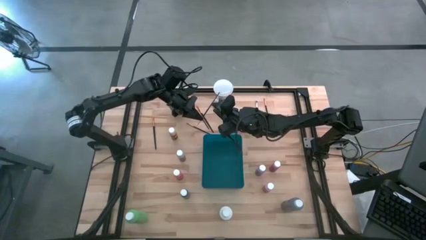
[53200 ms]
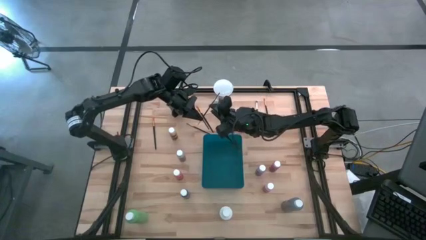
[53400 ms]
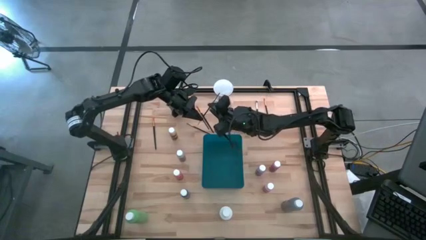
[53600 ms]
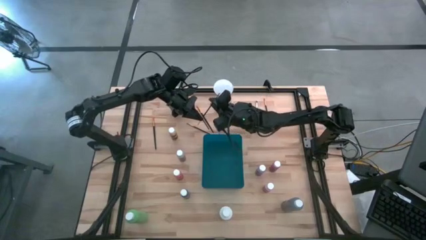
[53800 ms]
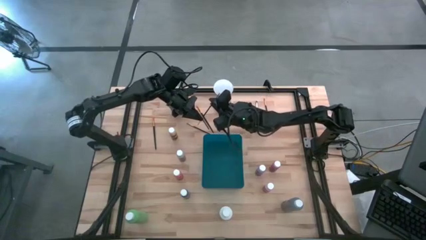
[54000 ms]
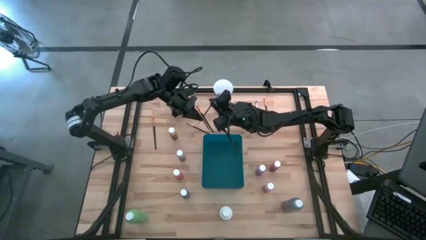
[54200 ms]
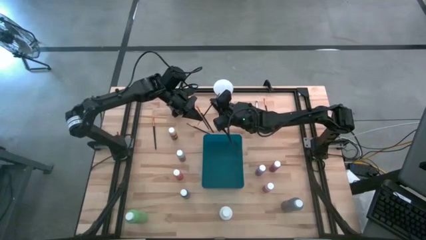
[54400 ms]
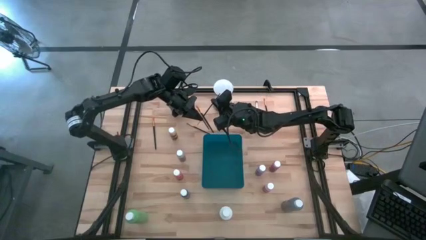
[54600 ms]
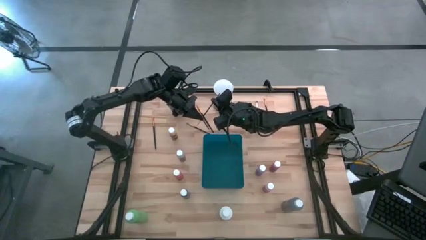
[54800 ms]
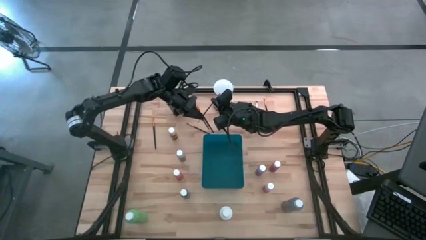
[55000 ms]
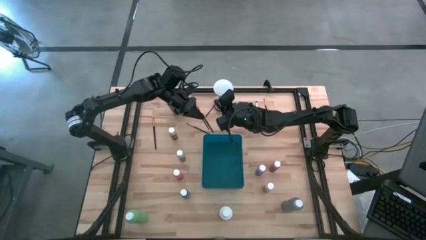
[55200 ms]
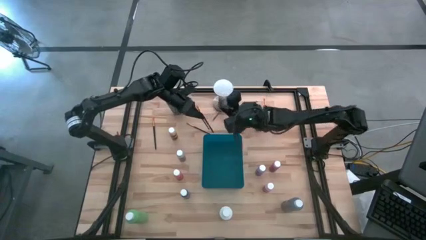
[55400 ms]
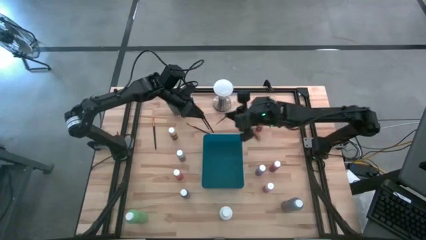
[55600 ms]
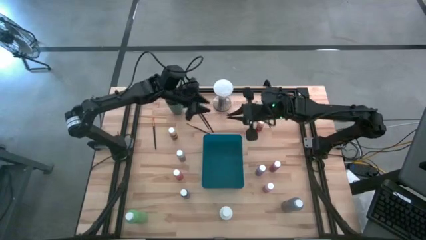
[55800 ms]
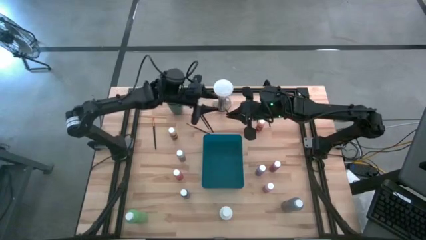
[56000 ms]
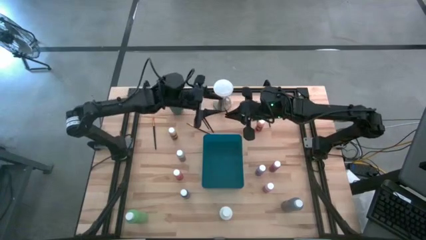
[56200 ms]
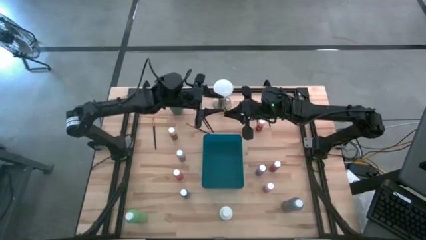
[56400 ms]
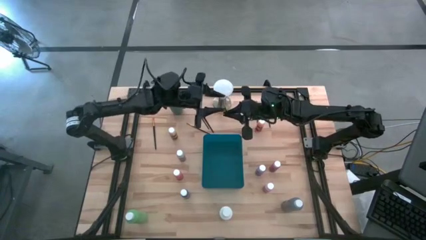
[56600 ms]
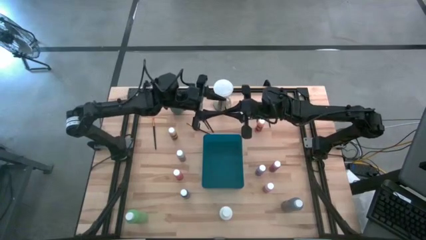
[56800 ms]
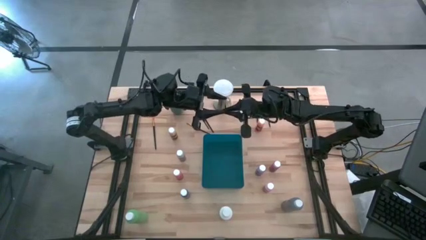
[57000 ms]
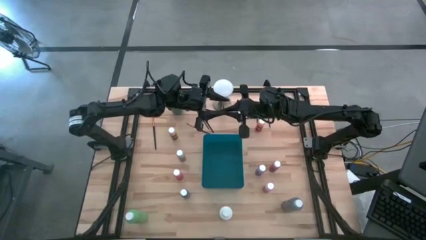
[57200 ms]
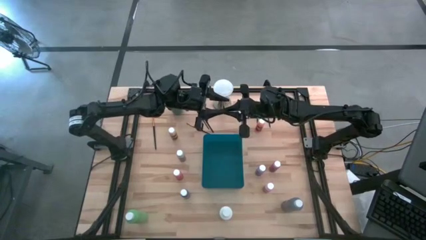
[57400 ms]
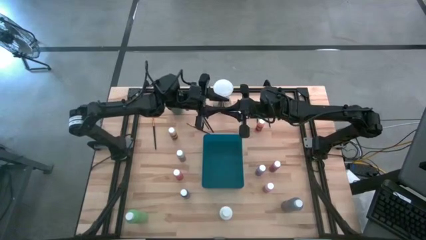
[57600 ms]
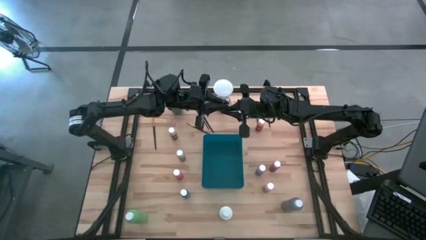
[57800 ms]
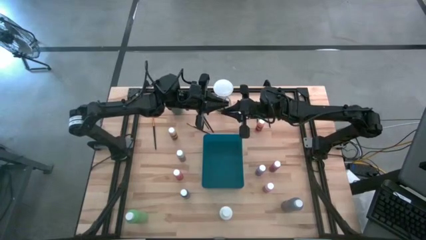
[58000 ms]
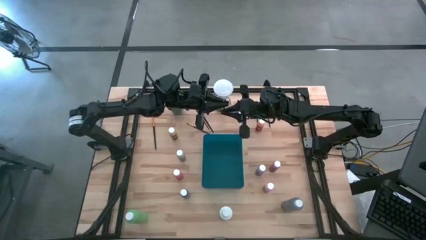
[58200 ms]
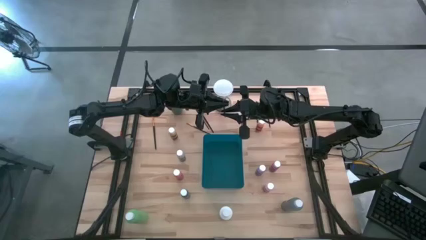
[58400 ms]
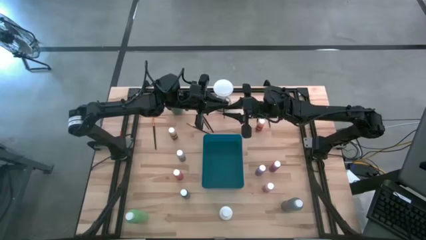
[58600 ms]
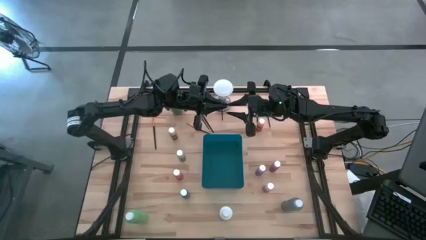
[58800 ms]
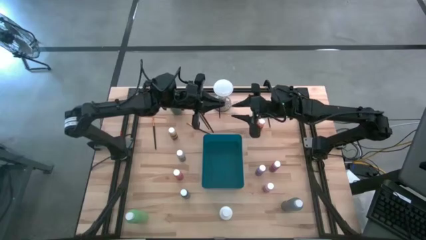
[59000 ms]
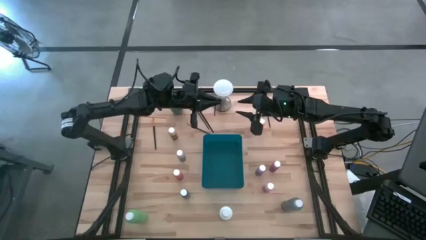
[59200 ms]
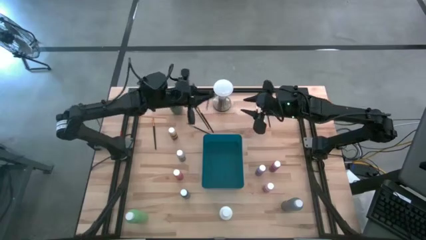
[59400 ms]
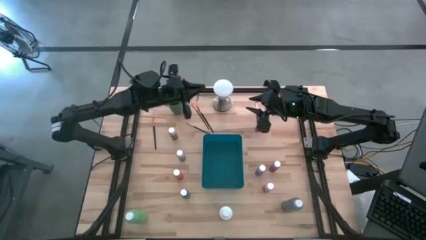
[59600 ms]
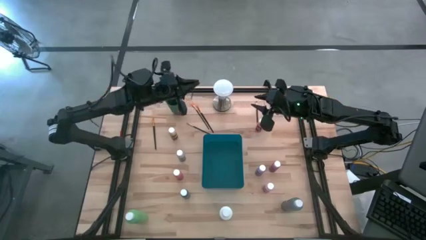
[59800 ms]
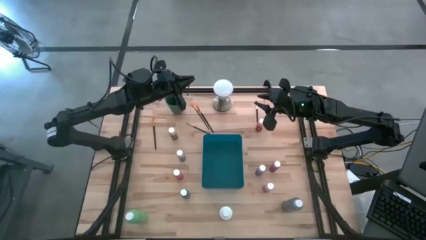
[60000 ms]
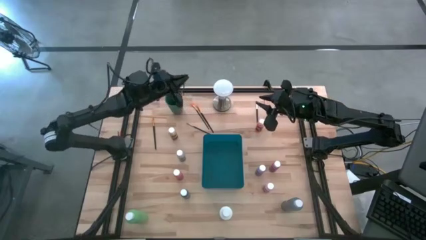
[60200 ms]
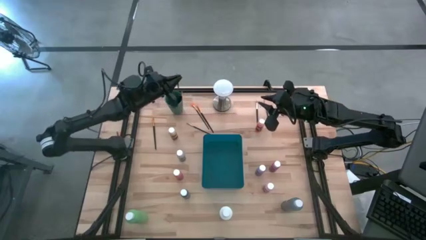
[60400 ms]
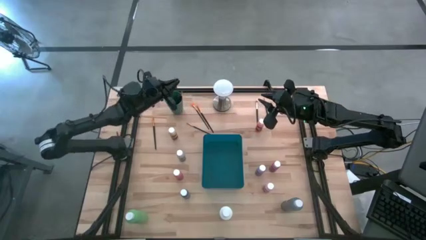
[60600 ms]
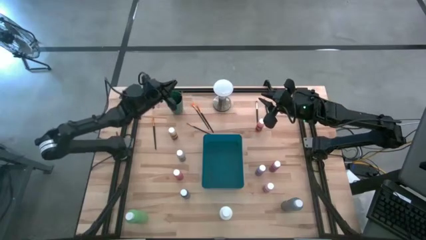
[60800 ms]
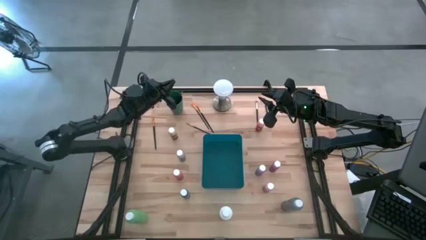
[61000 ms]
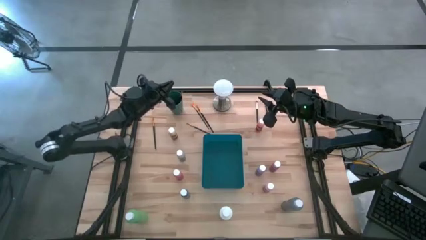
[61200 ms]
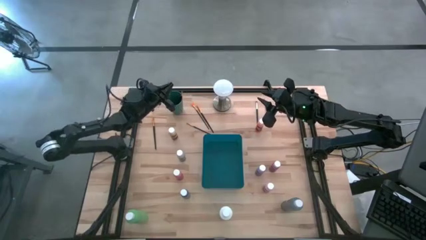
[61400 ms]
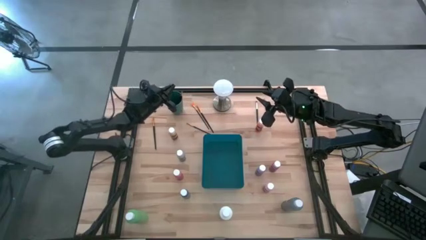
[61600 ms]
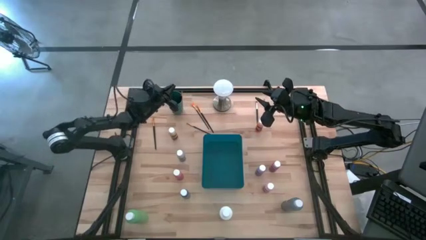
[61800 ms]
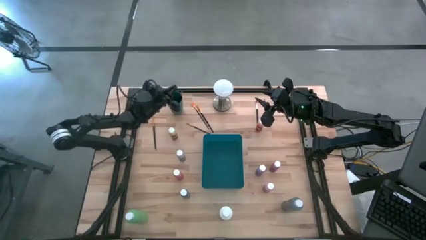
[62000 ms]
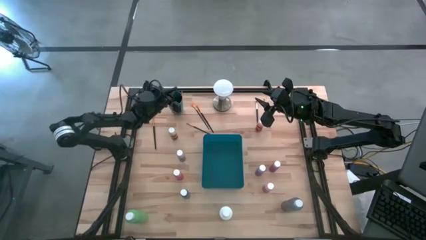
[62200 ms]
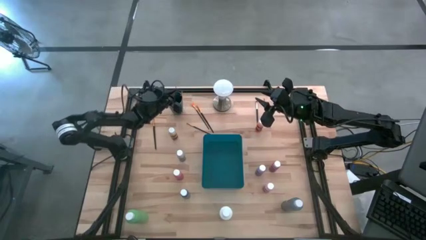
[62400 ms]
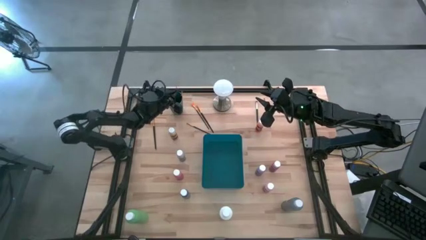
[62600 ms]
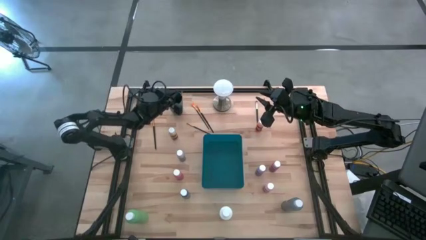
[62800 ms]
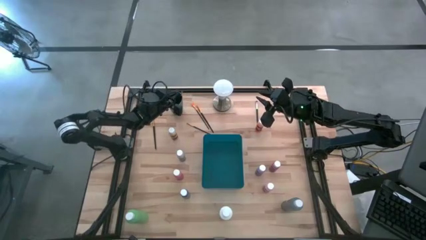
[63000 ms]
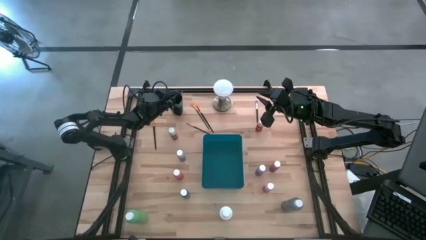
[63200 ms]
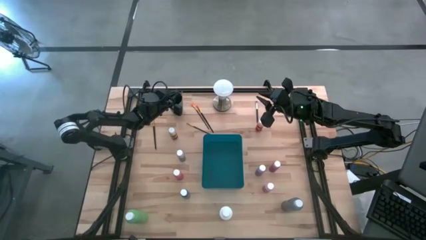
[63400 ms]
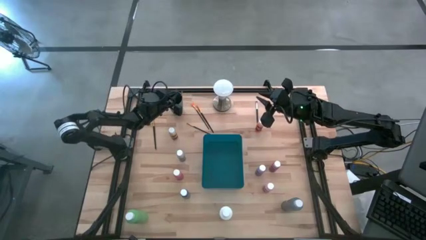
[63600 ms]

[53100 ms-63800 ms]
Task: Pick & Place Paint Supplies
Put the yellow paint brush into the green cup

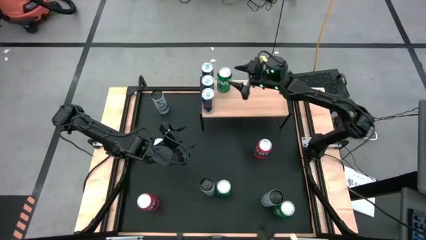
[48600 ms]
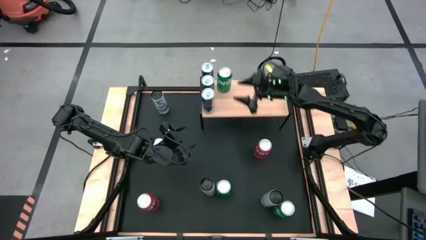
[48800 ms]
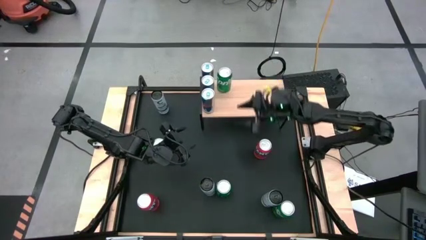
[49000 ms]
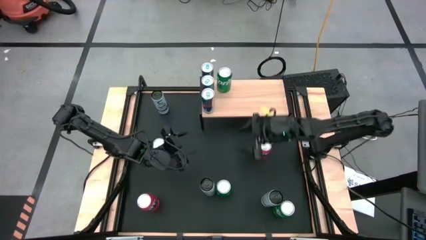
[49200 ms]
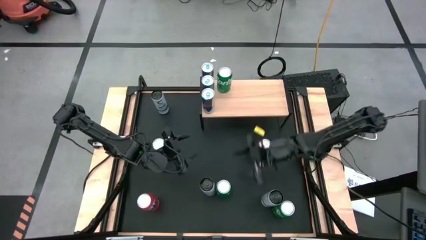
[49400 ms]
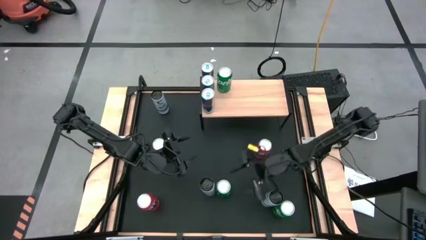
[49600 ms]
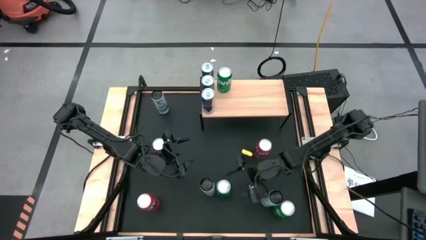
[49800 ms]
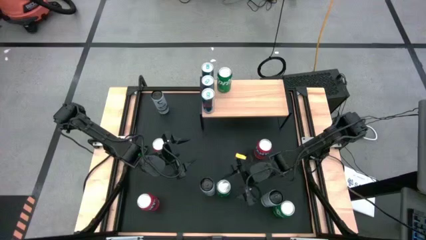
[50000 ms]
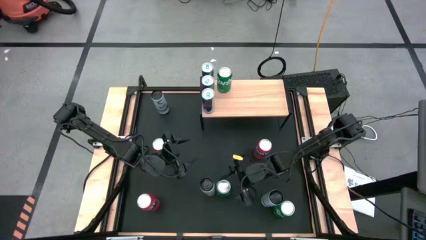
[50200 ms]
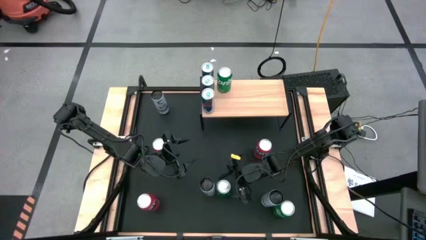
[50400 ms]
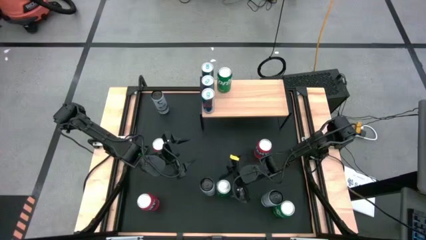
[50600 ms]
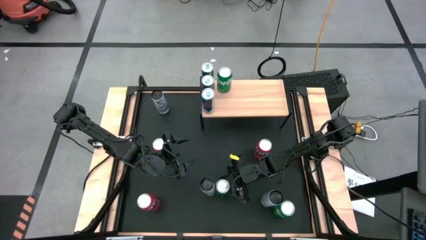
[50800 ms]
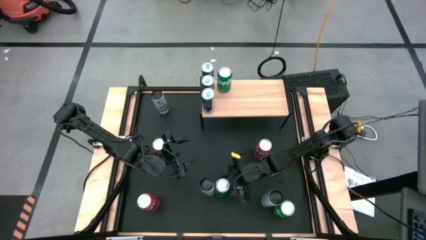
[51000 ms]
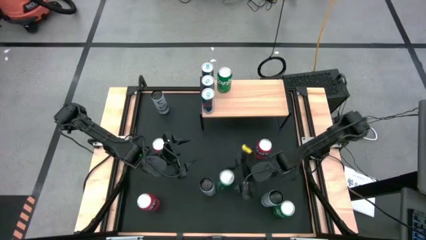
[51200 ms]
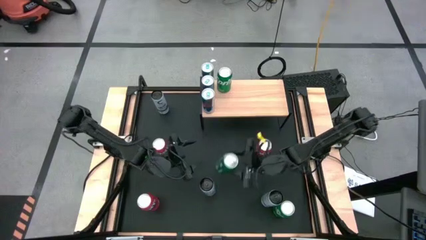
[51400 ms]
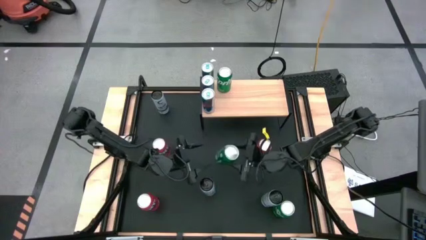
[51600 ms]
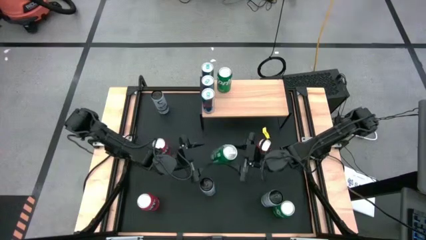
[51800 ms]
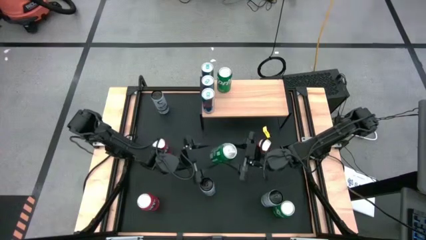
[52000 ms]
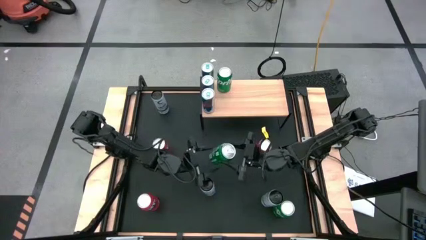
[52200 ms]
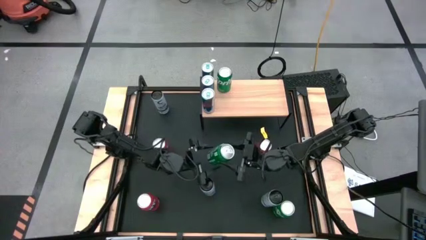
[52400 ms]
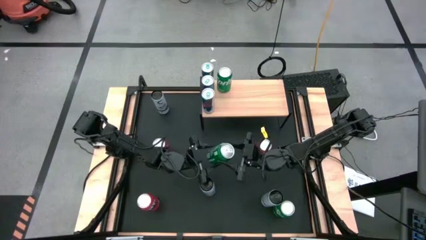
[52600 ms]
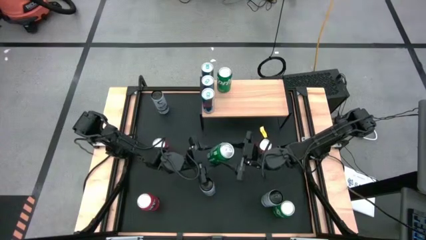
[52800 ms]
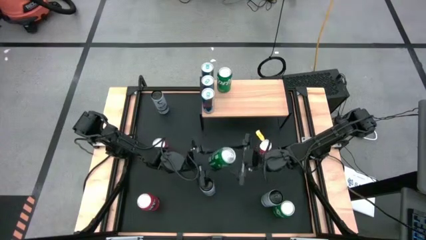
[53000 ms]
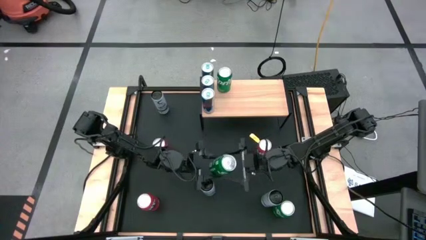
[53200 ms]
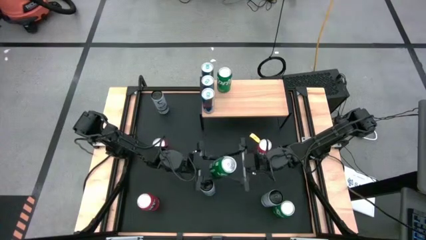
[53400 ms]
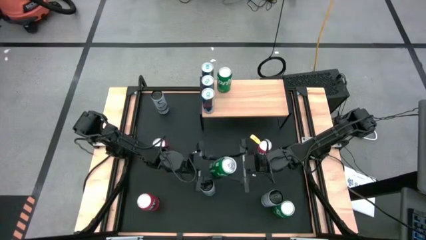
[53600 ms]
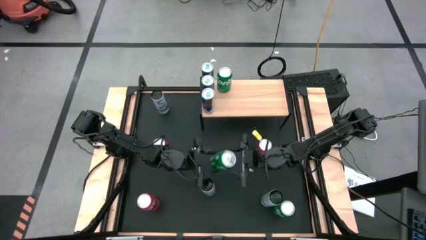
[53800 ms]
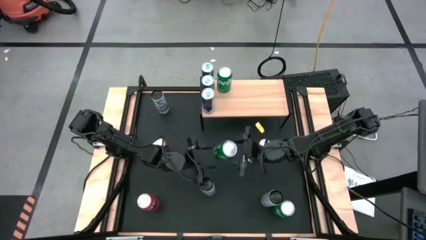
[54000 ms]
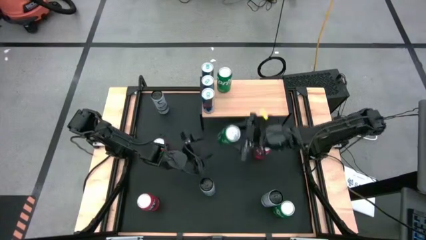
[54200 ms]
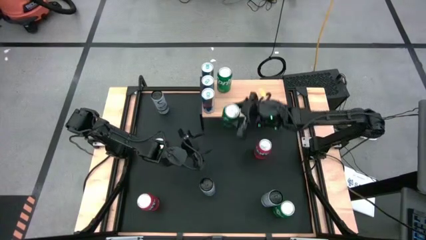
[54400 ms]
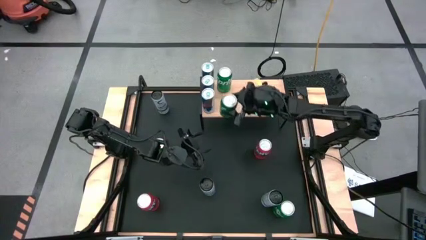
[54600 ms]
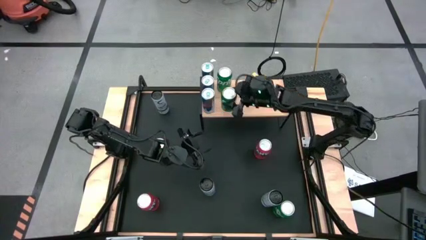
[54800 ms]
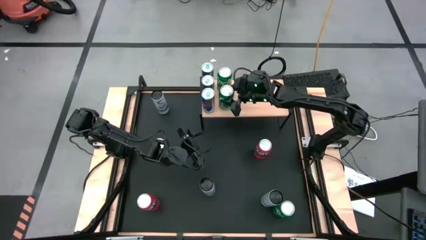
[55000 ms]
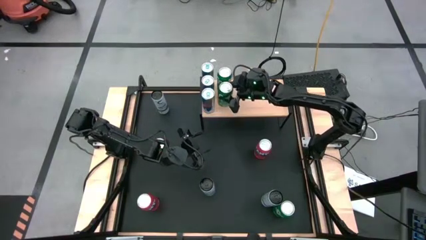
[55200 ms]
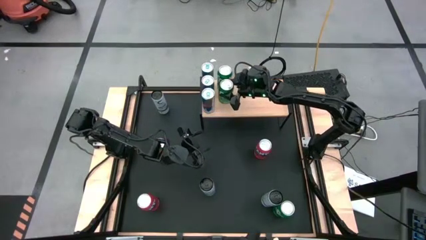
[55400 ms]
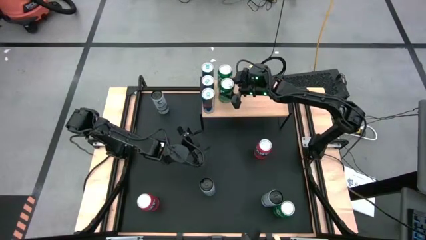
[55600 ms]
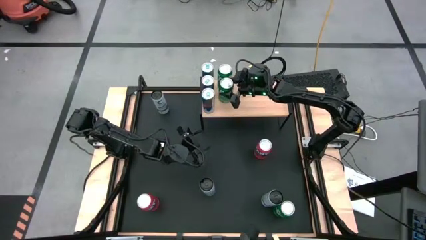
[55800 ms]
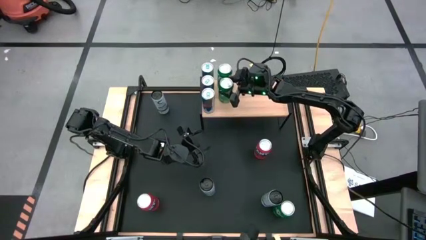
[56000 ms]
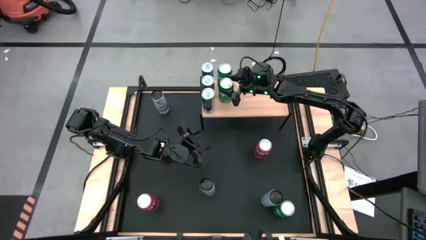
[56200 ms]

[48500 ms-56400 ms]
Task: Place canned beverage on shelf
Put the left green soda can on the shelf aligned with the other green soda can
